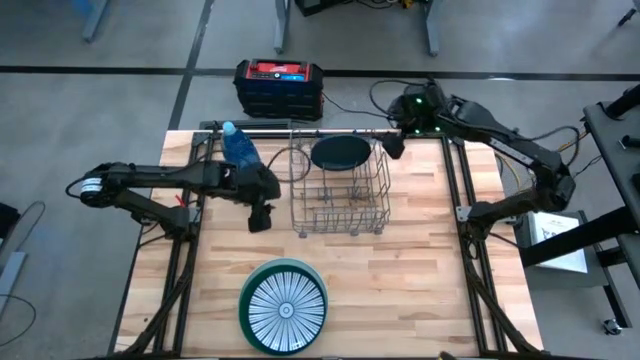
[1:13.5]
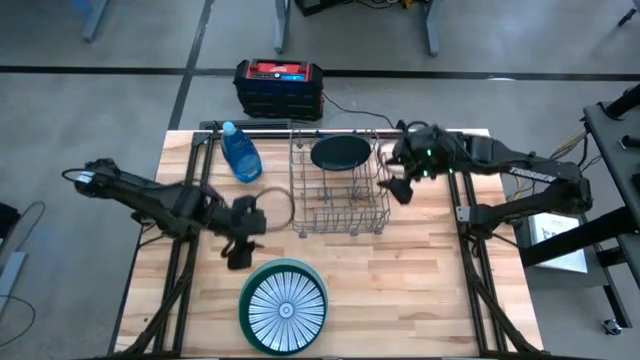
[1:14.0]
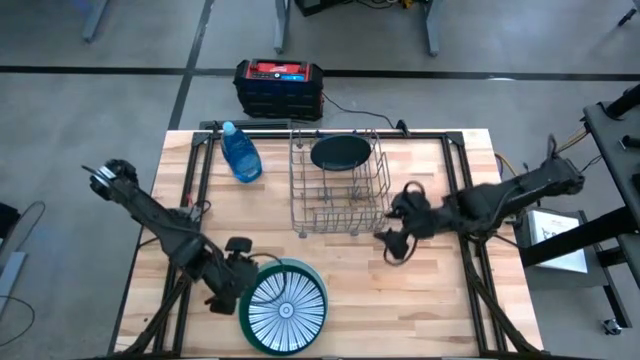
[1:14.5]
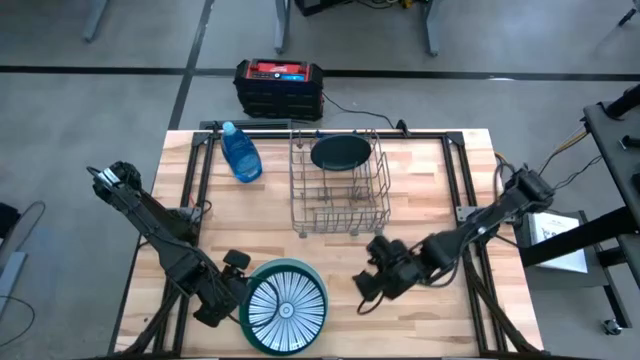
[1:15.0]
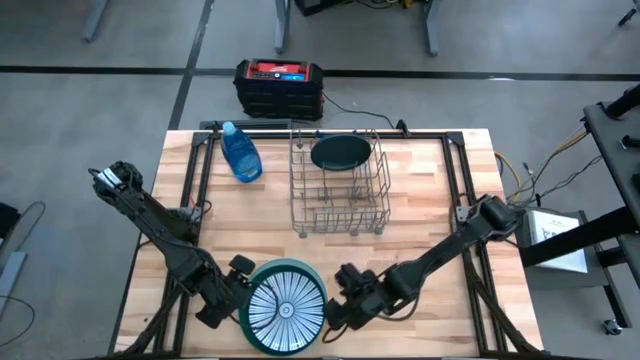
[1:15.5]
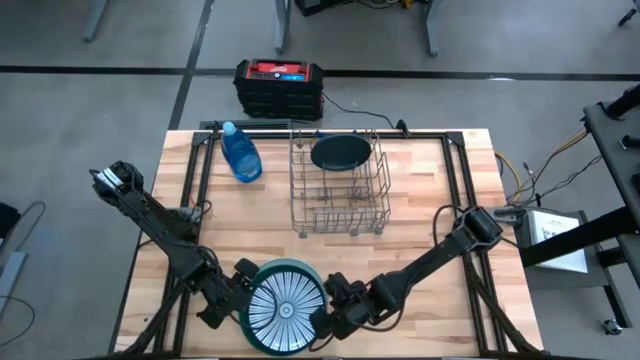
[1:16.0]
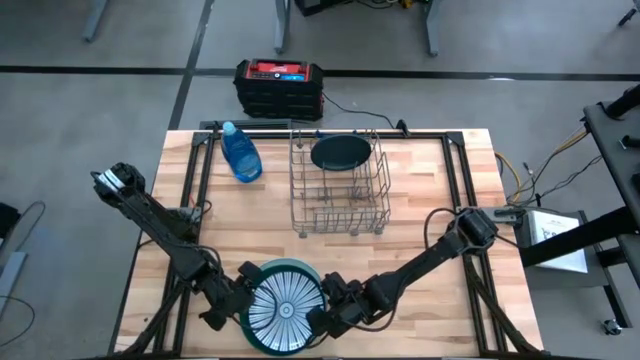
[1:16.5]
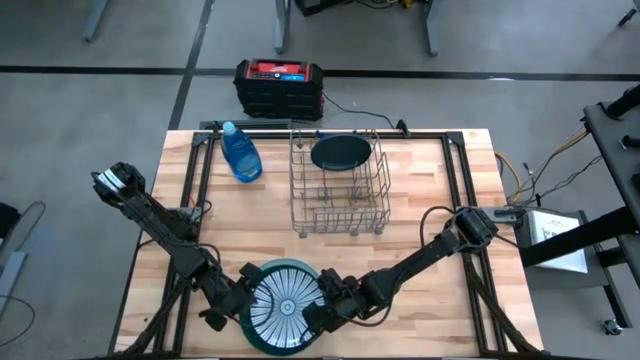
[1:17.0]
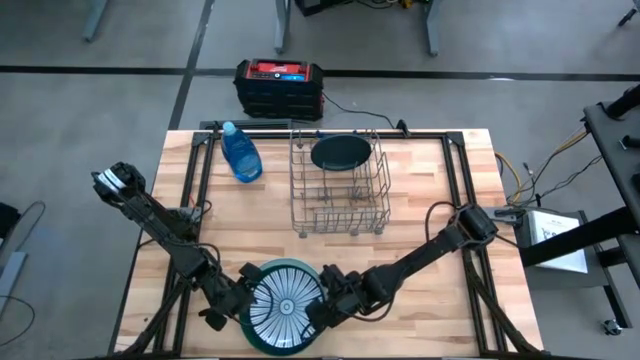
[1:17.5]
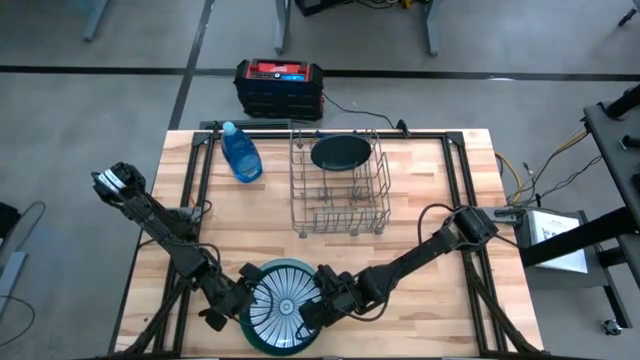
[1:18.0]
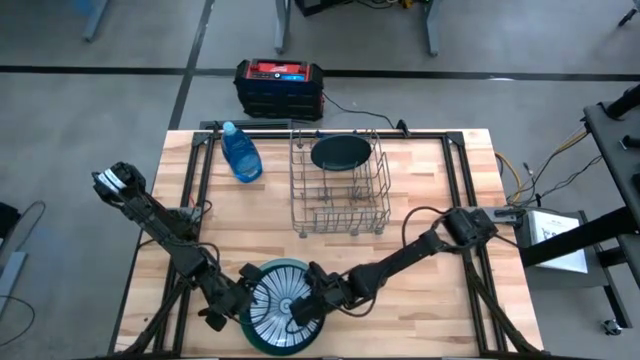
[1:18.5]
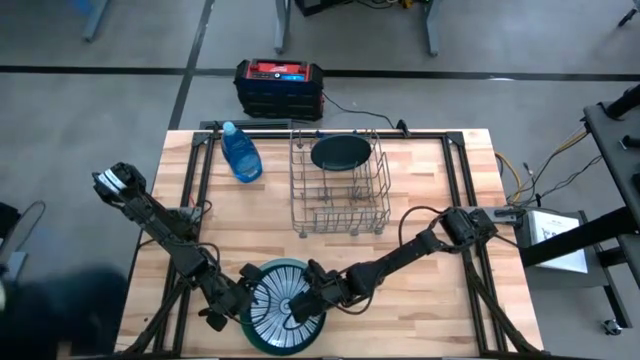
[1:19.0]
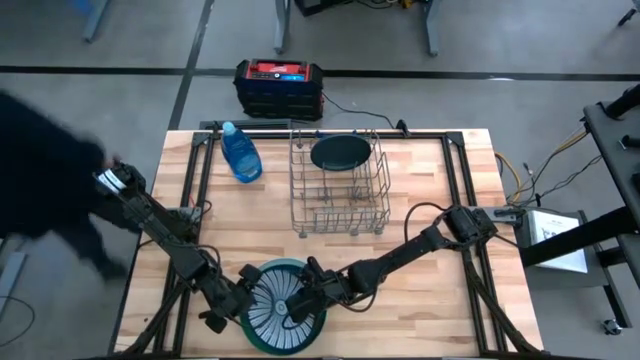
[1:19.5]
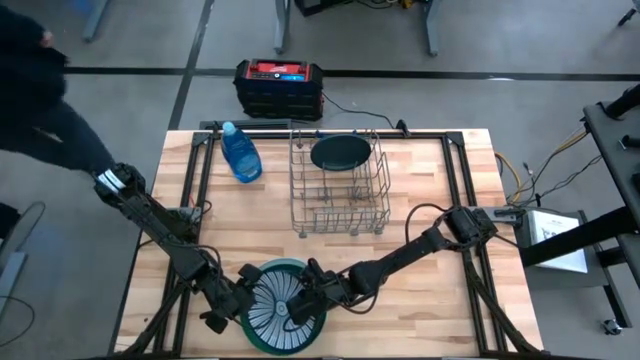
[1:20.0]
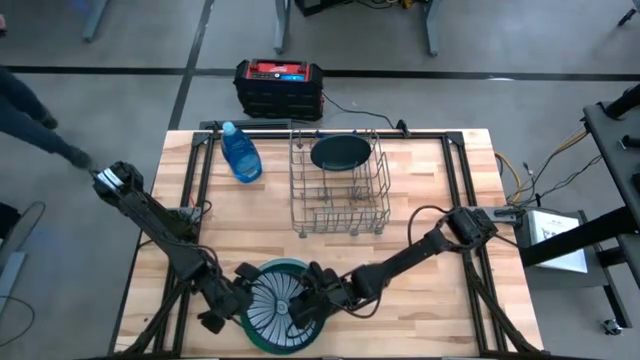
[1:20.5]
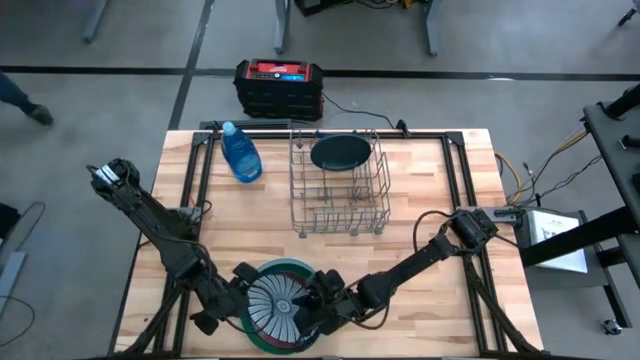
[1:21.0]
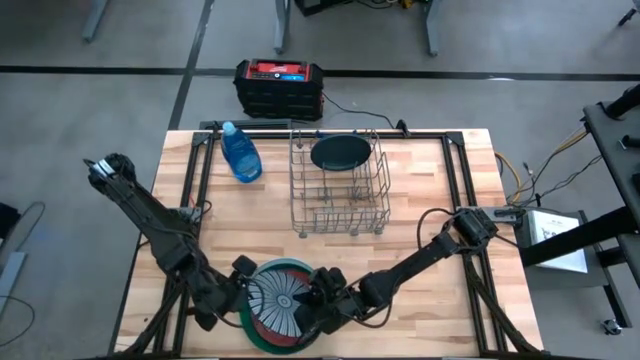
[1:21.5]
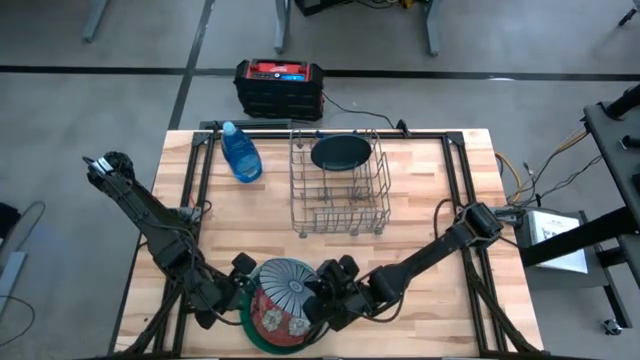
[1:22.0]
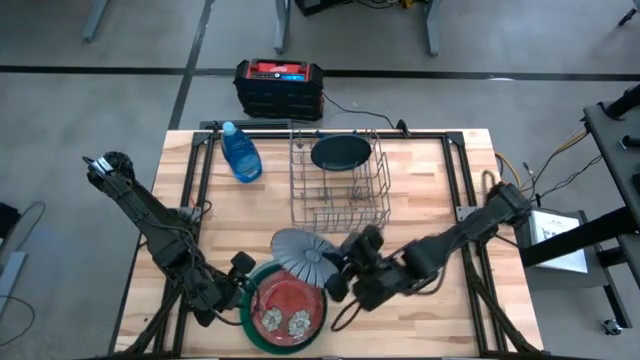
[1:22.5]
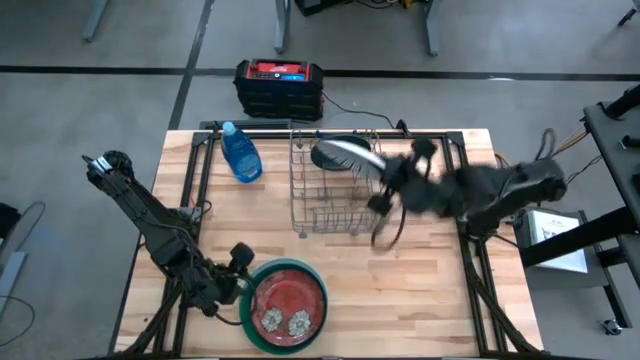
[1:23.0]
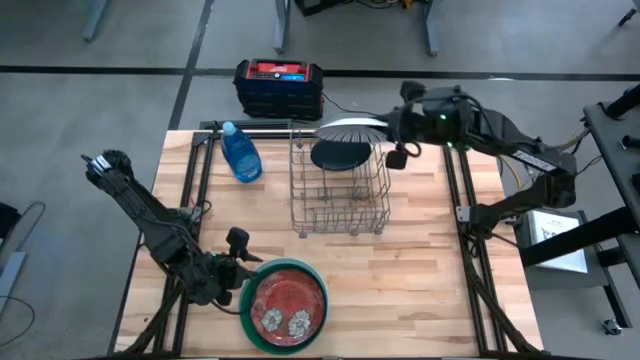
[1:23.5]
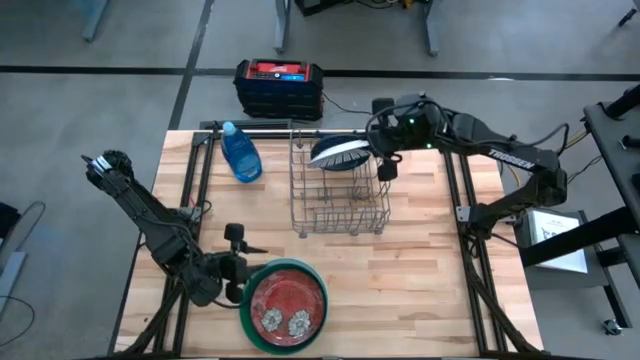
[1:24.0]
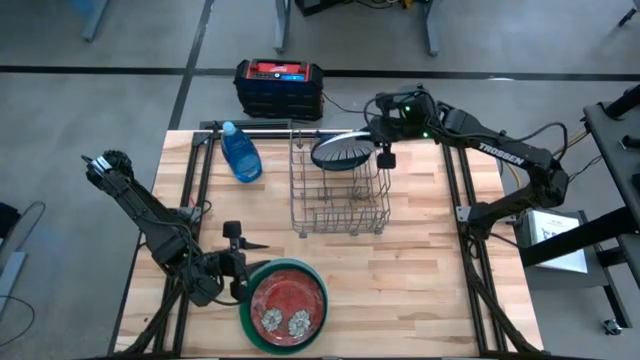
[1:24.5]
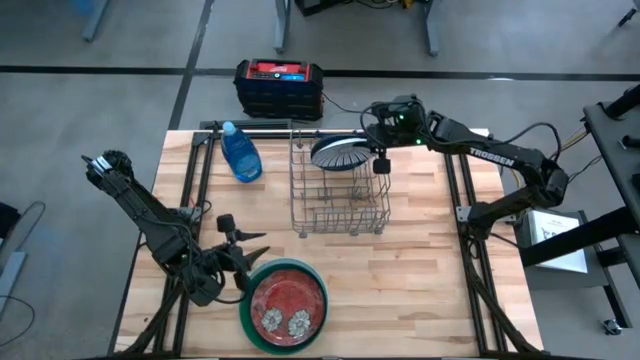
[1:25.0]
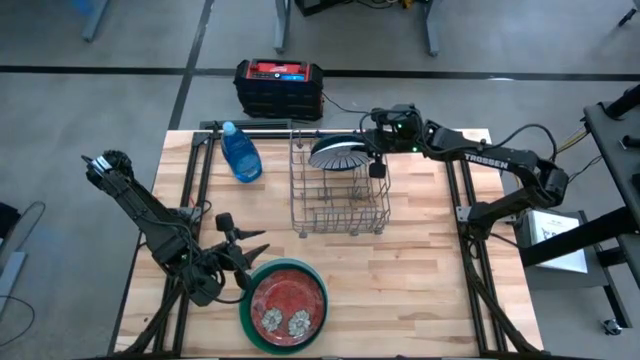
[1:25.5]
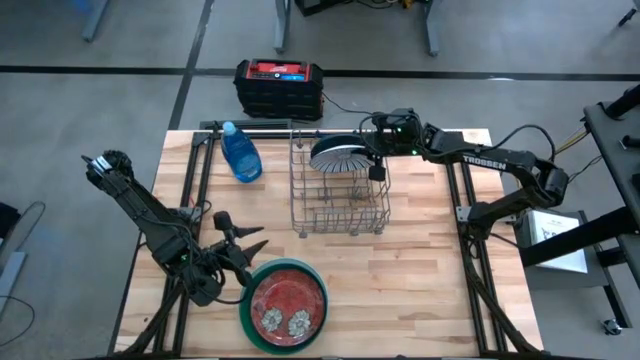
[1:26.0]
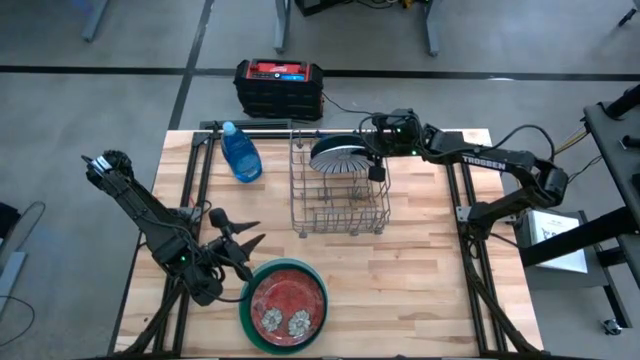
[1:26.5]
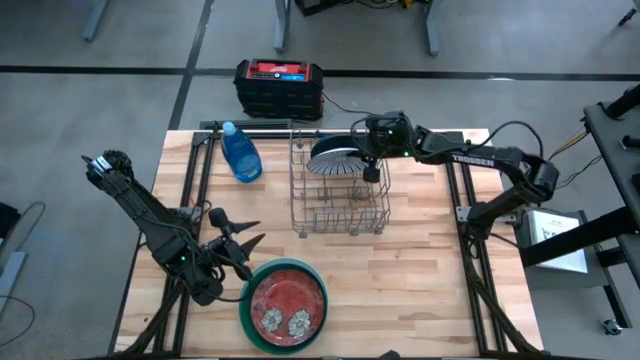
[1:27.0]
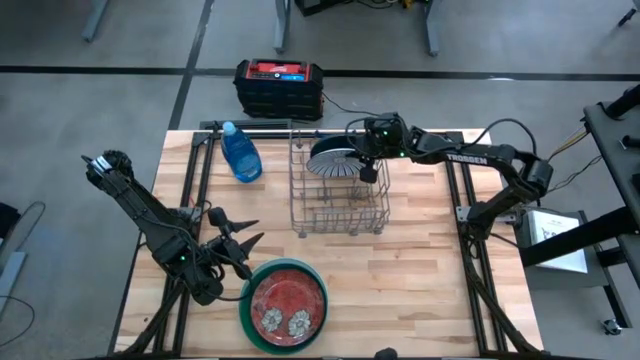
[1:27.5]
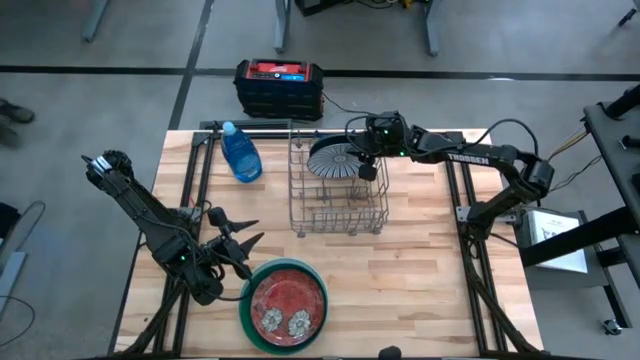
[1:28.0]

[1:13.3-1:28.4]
Task: Sort dishes
Put the white patterned plate into the gray dishwasher rack

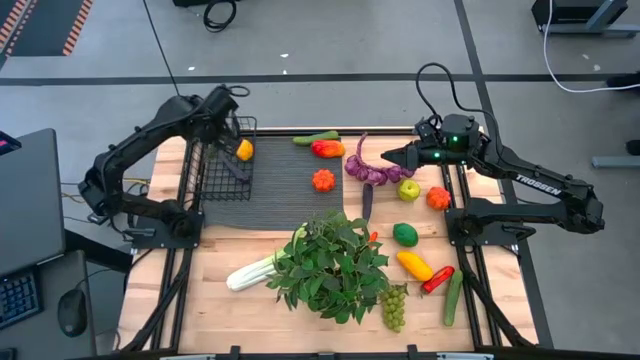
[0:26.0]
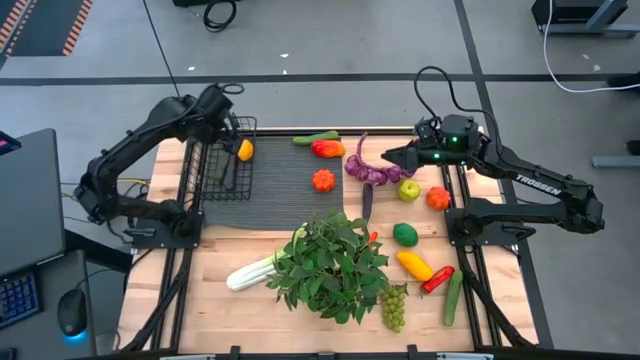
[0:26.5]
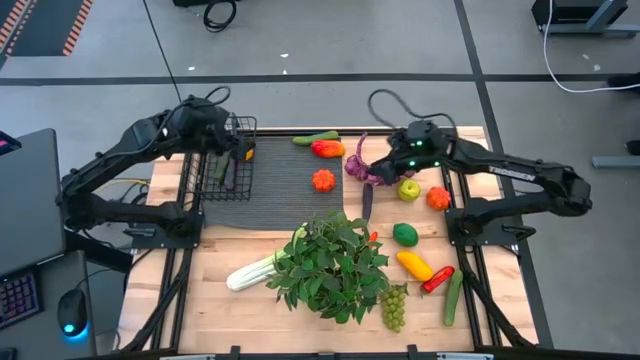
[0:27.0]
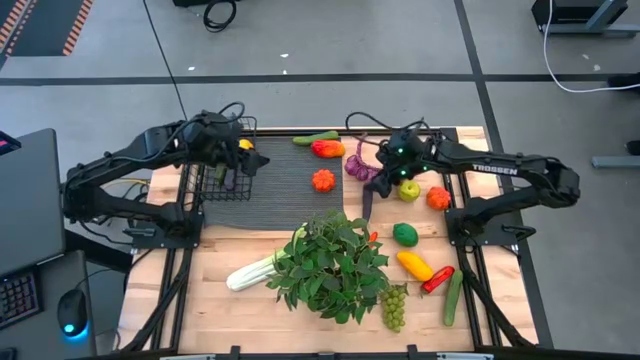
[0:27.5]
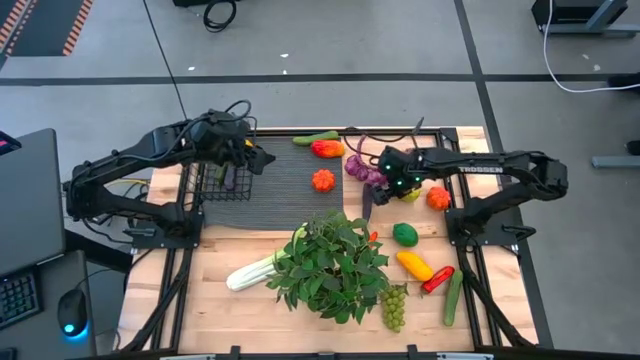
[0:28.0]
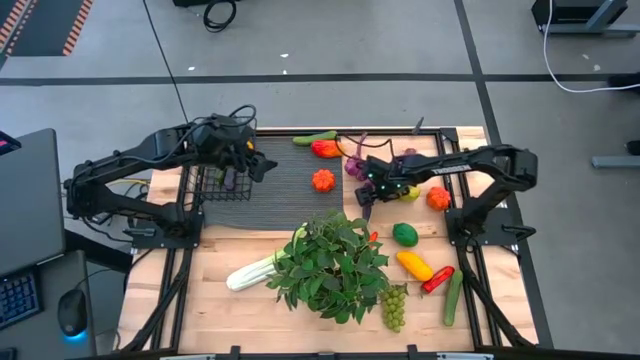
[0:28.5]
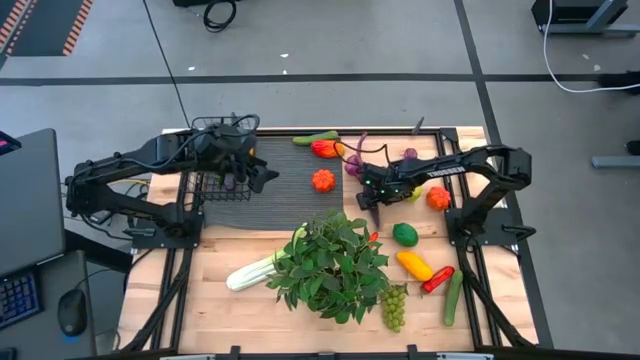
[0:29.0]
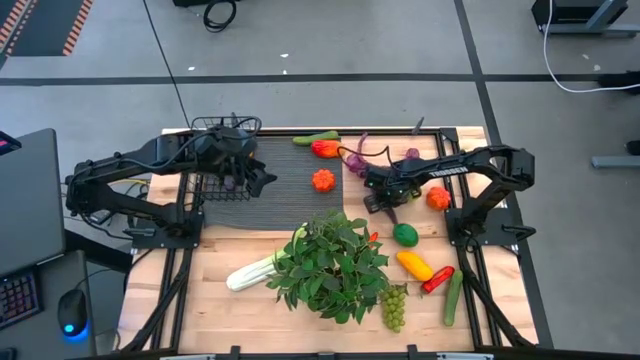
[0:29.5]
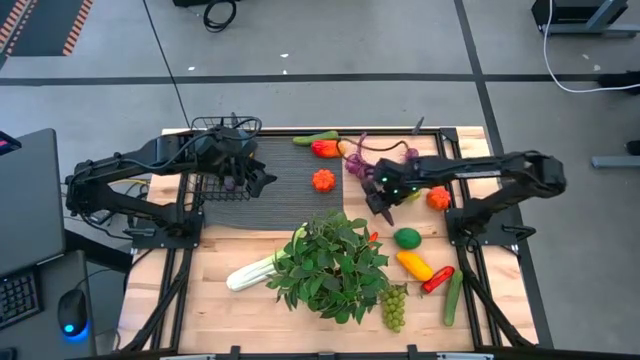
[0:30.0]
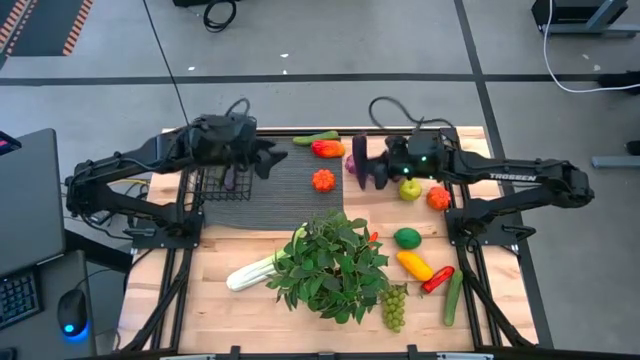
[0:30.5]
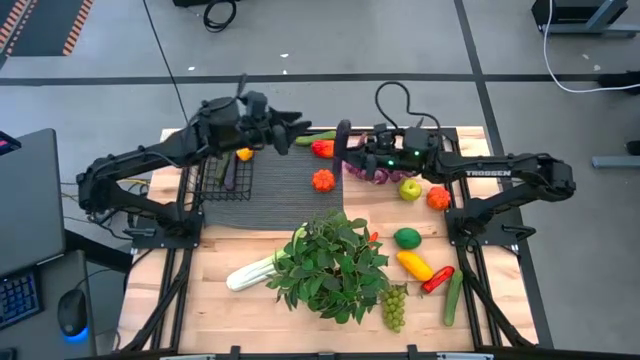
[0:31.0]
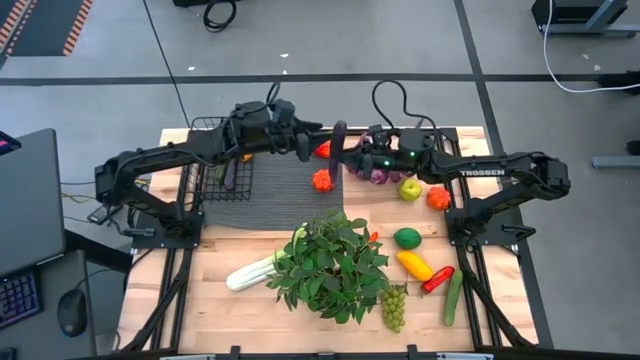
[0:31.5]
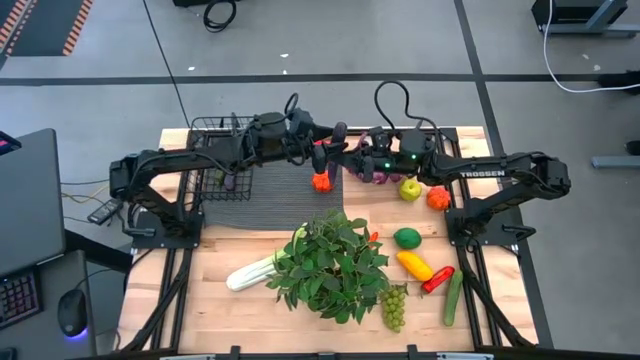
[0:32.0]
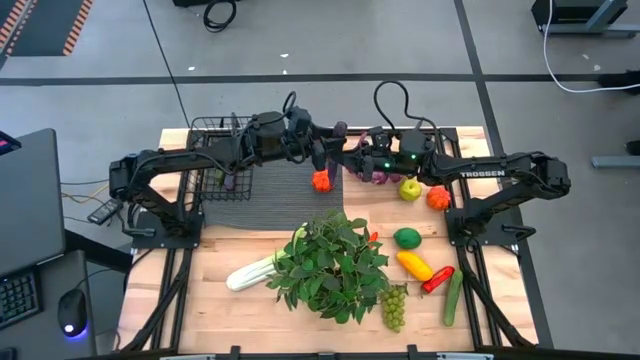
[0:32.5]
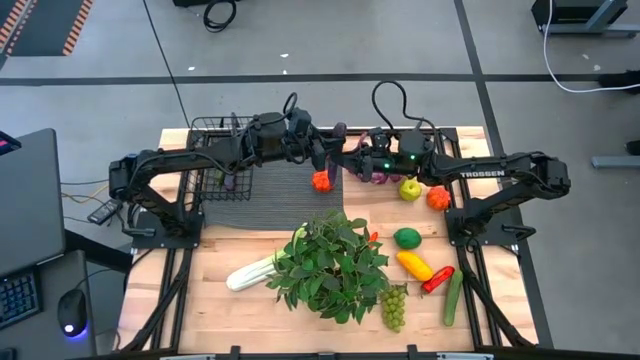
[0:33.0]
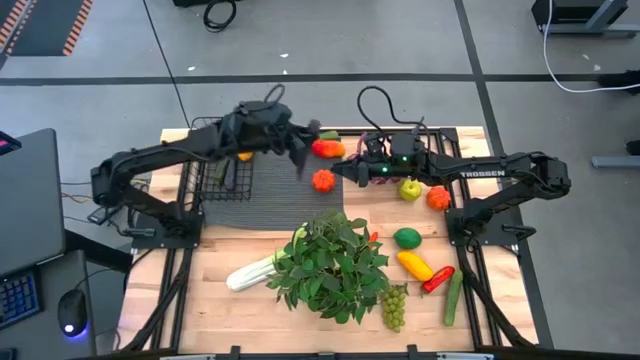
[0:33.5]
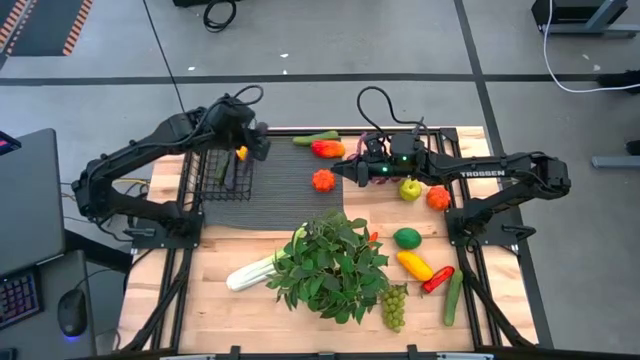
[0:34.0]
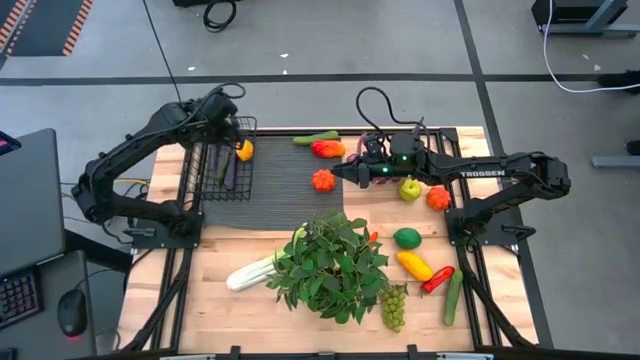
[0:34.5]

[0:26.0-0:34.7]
Task: Build produce basket
Put the violet eggplant into the wire basket
